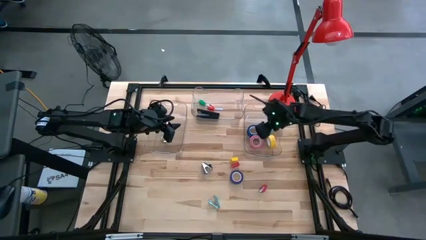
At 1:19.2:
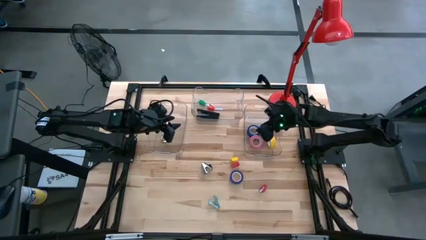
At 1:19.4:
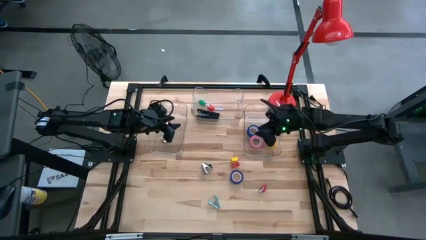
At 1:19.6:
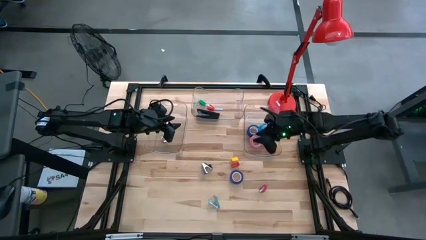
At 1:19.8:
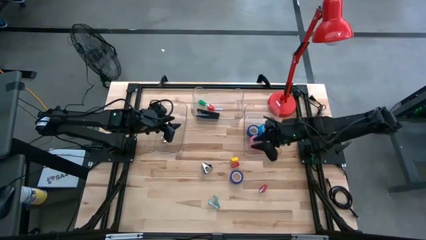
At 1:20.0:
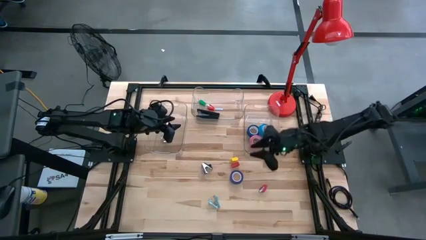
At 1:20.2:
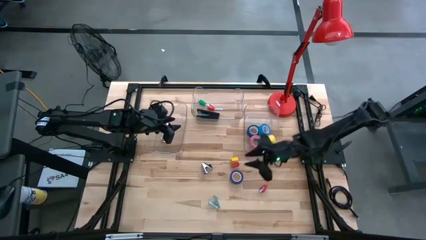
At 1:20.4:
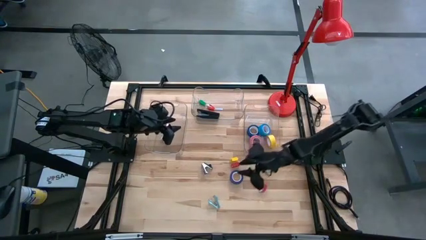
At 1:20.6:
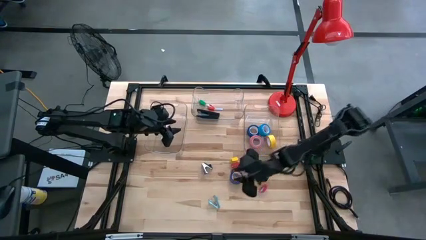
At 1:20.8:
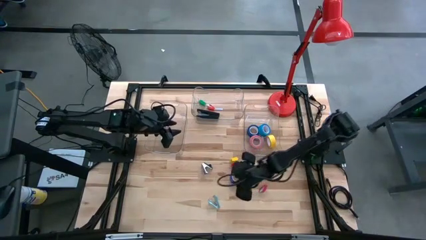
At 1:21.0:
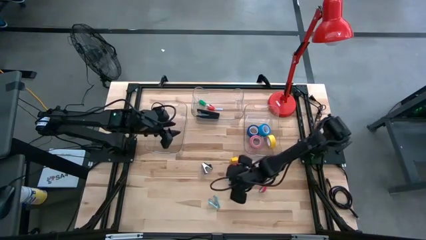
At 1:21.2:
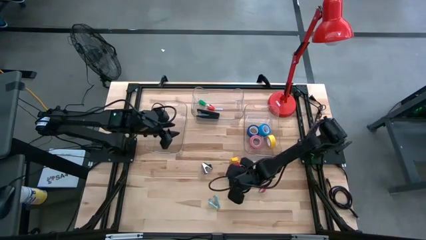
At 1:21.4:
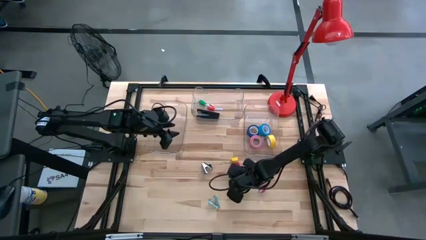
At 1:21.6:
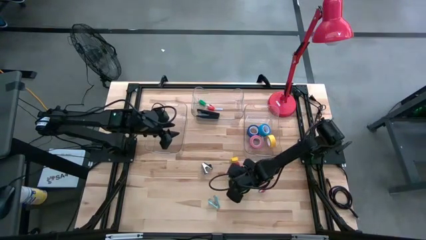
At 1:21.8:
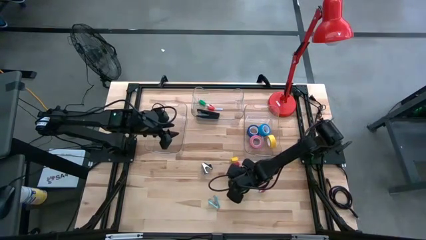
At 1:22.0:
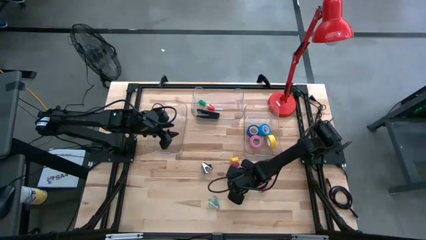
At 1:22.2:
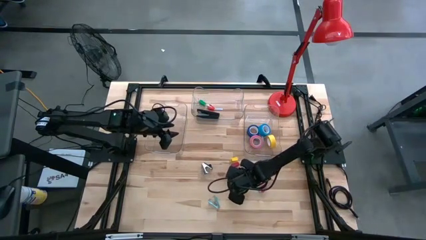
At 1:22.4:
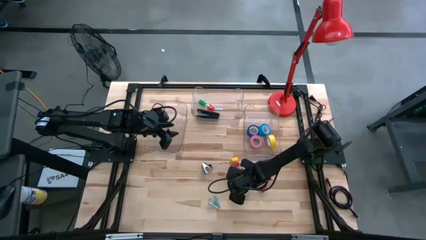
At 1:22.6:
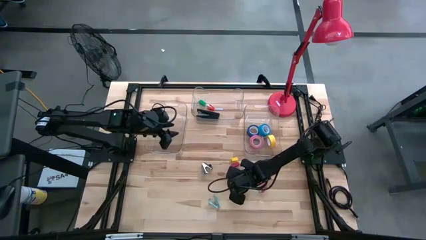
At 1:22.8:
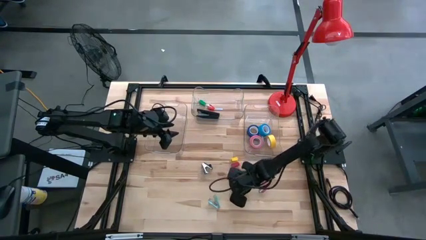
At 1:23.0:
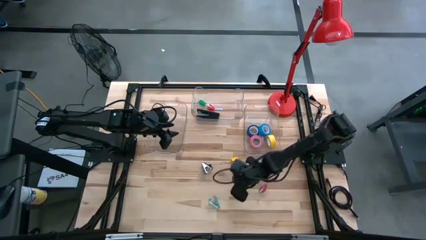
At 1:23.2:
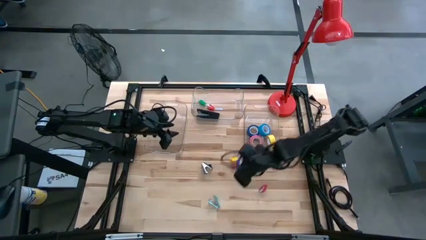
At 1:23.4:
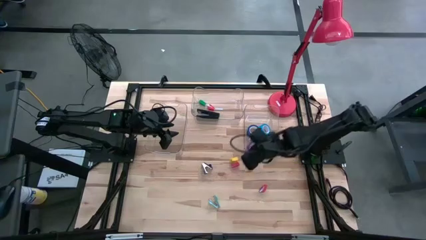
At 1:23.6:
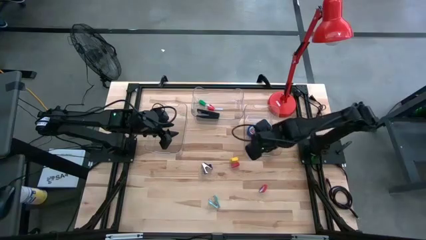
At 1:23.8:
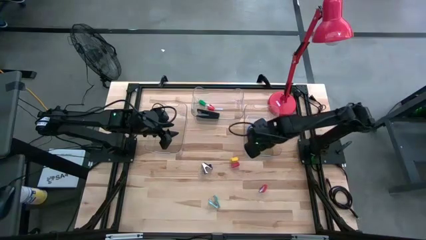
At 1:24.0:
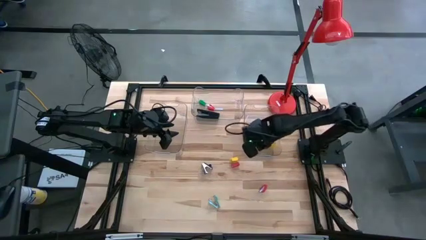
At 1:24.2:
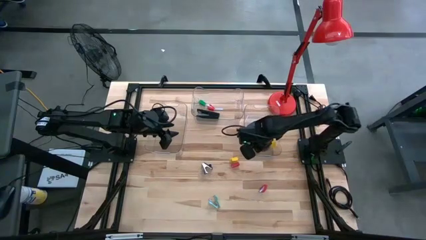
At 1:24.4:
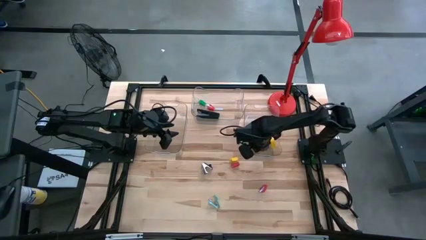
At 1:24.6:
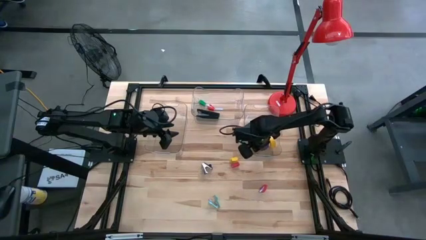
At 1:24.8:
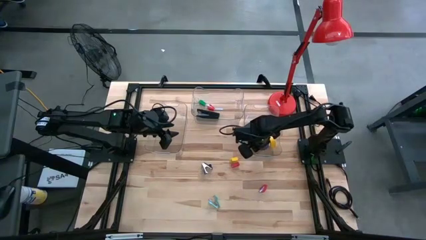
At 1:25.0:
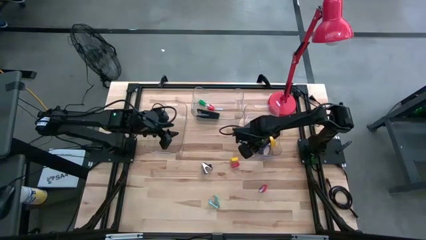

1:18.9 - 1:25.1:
Task: Pick and place Stapler, Stapler remover, tape
Put the purple tape into the bottom right transparent bin

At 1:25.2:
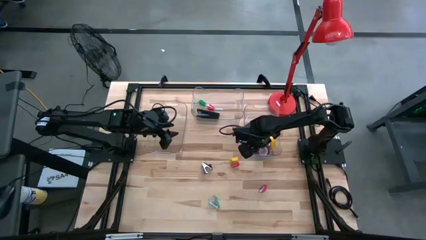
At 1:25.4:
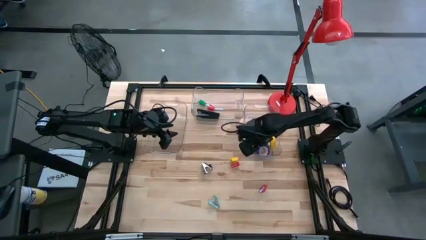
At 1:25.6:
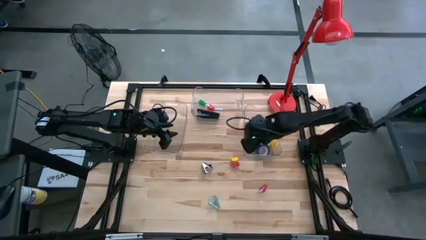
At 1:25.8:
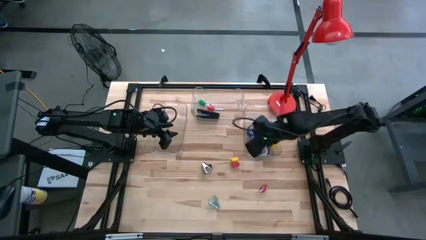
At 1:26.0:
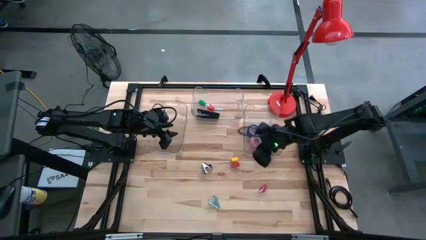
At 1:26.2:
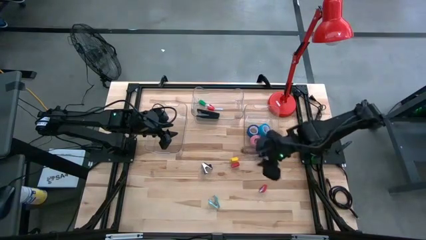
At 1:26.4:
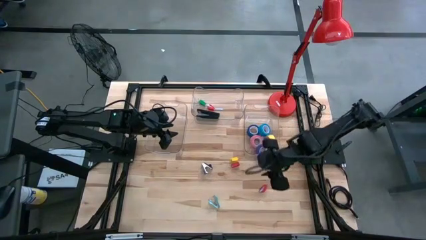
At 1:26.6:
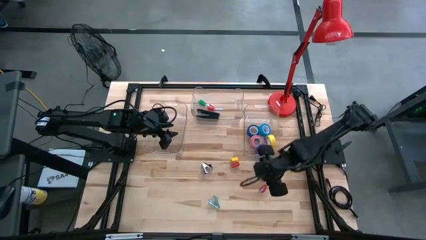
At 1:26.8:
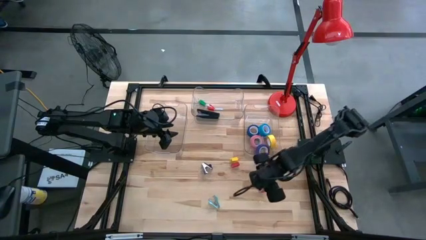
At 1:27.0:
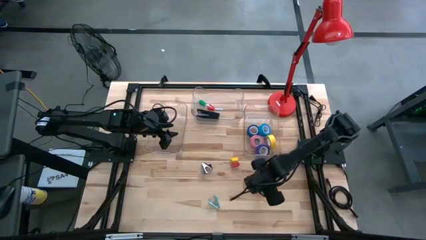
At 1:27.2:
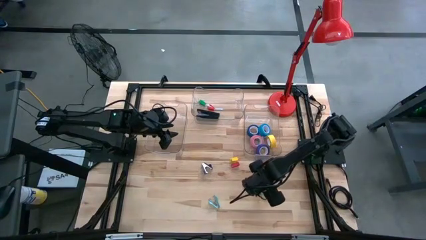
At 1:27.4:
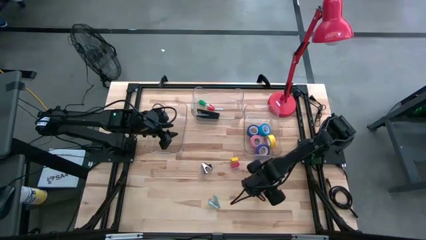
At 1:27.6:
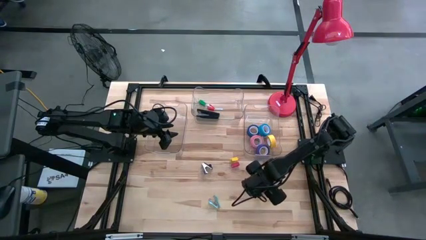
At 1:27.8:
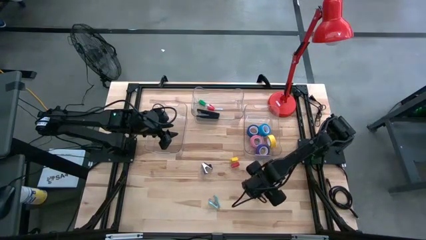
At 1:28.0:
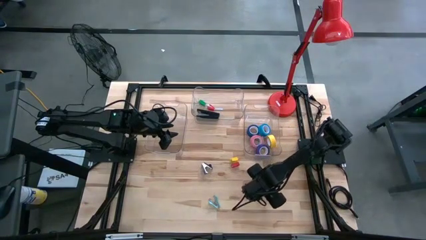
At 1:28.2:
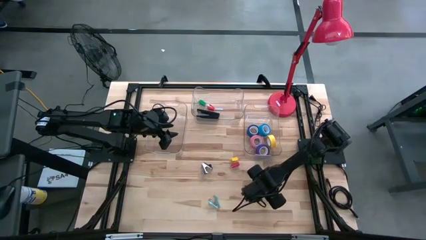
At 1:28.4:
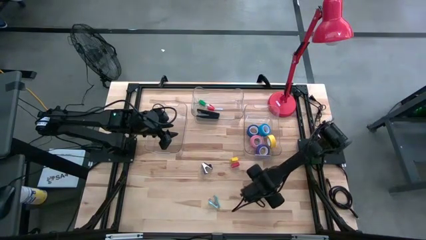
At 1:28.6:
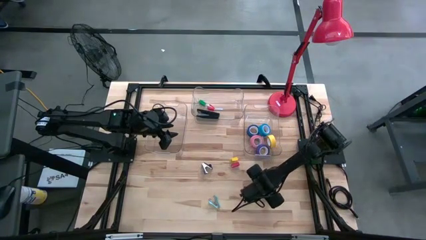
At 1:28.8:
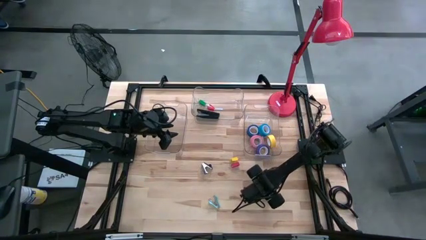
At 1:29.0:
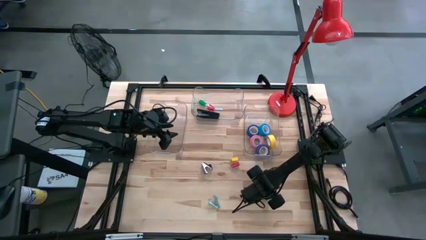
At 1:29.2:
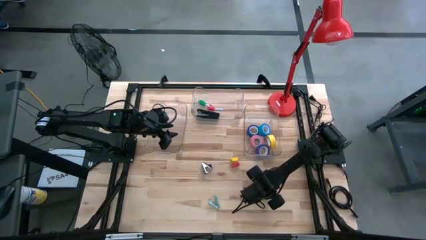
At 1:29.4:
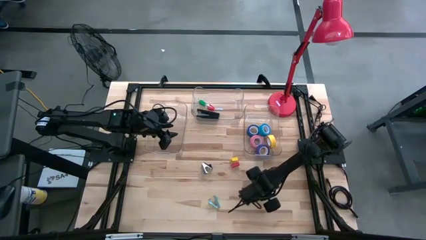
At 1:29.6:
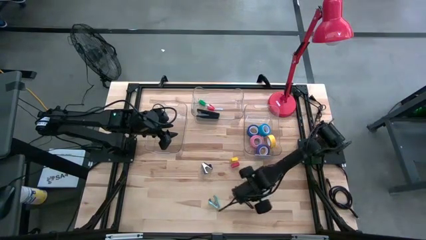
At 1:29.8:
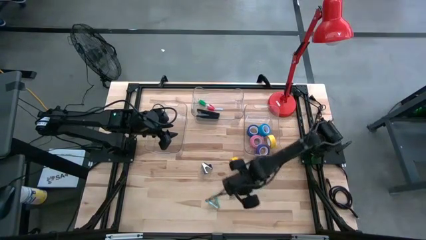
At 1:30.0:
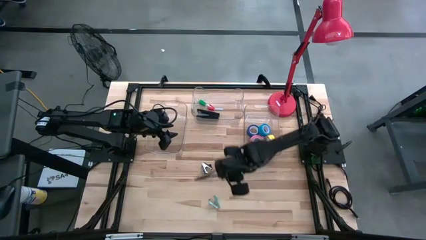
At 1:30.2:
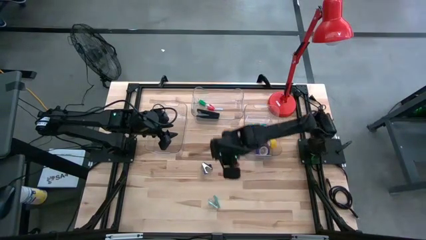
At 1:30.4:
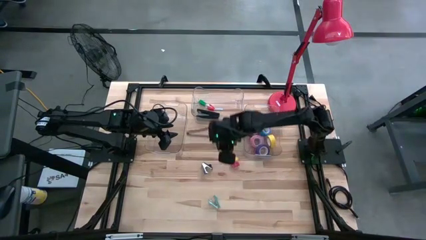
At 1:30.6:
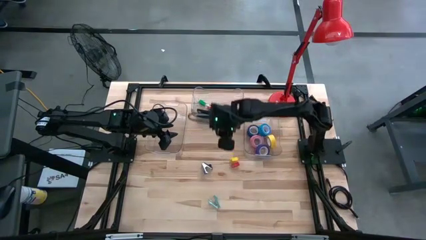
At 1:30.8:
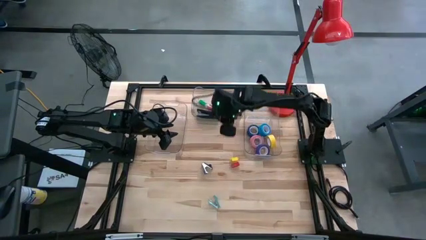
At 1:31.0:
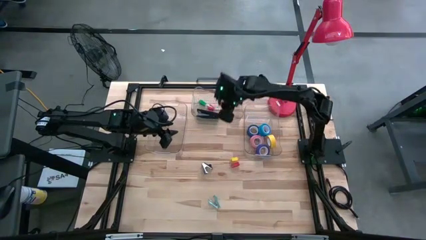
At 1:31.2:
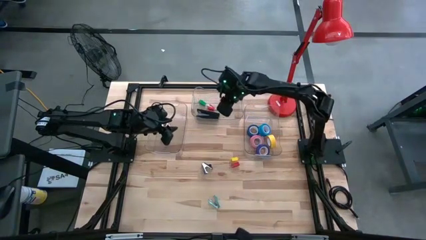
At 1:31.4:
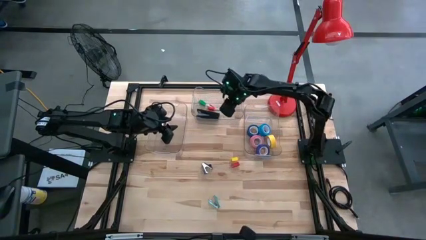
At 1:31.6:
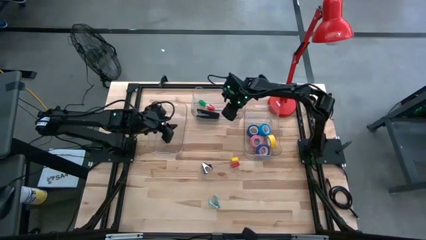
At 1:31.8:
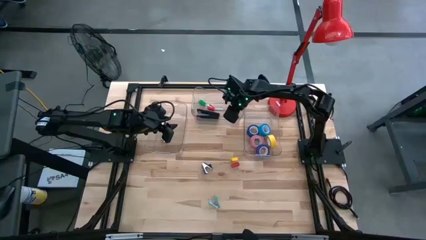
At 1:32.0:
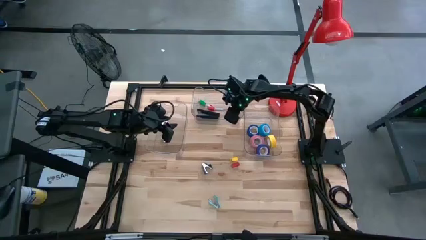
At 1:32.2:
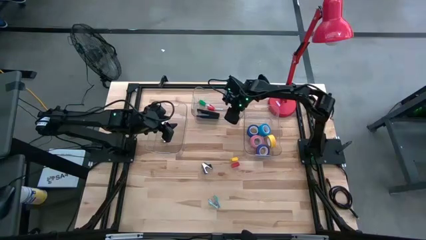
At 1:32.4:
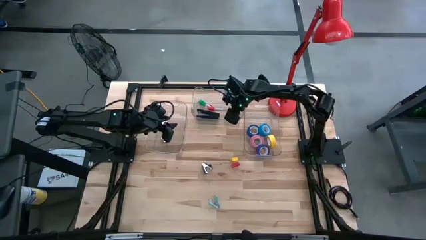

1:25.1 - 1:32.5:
Put the bottom red stapler into the top transparent bin

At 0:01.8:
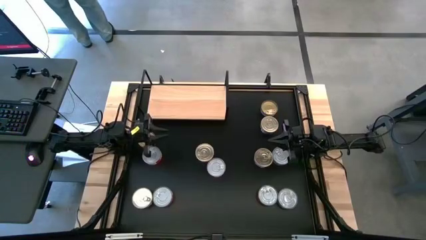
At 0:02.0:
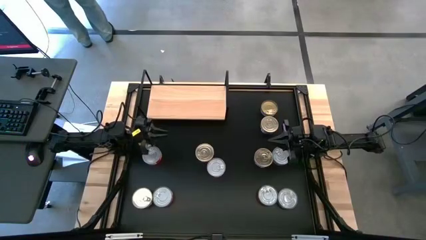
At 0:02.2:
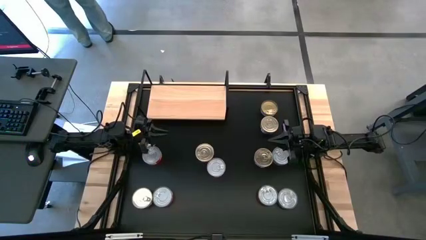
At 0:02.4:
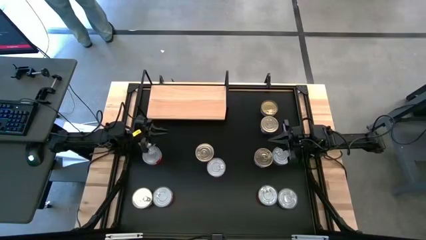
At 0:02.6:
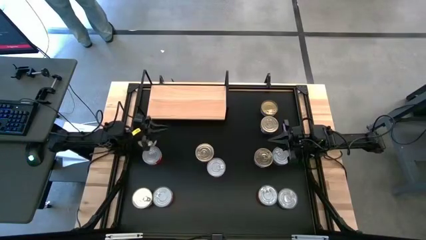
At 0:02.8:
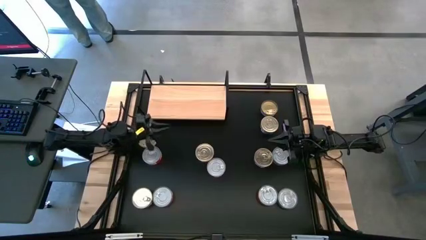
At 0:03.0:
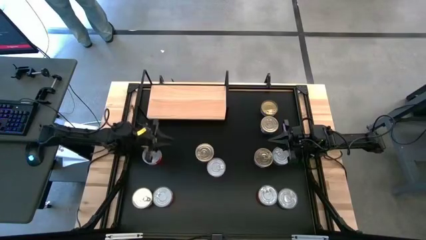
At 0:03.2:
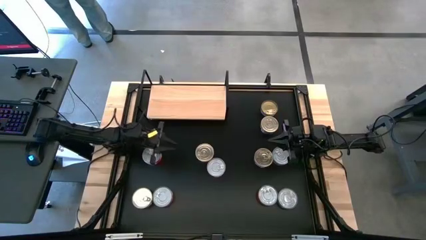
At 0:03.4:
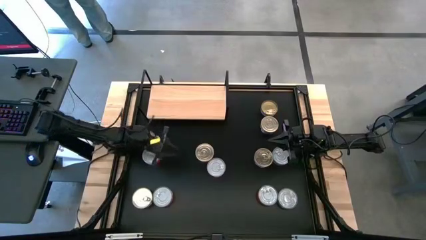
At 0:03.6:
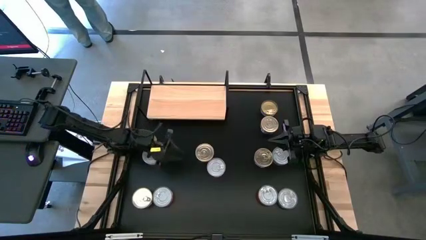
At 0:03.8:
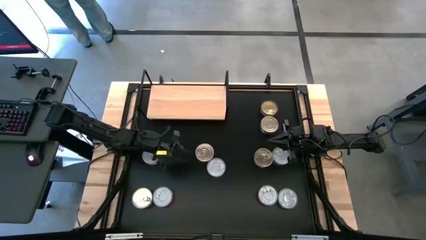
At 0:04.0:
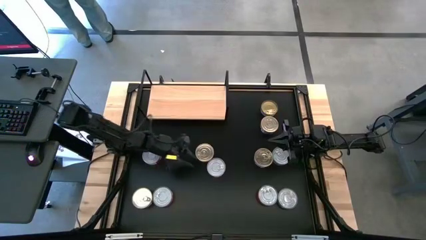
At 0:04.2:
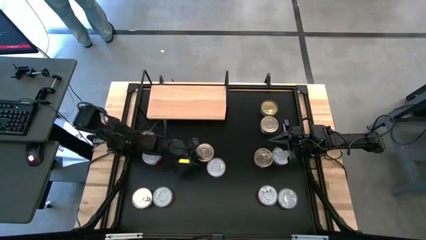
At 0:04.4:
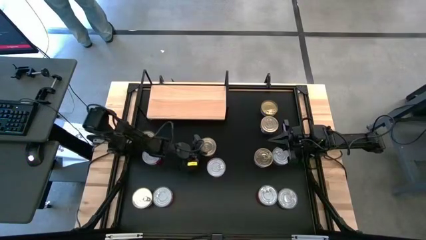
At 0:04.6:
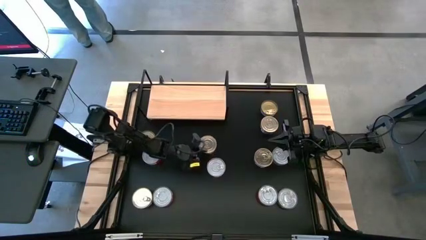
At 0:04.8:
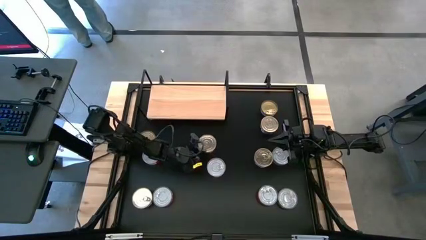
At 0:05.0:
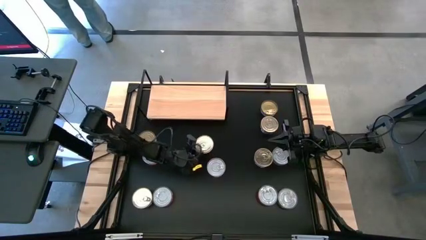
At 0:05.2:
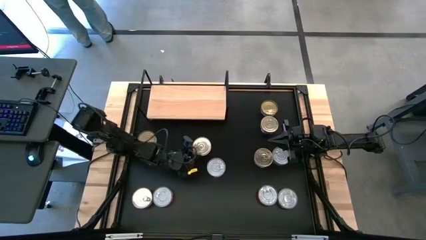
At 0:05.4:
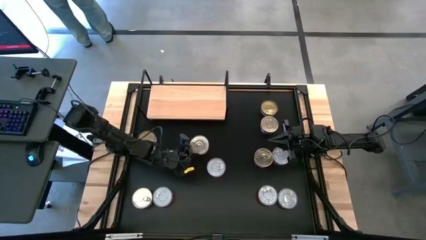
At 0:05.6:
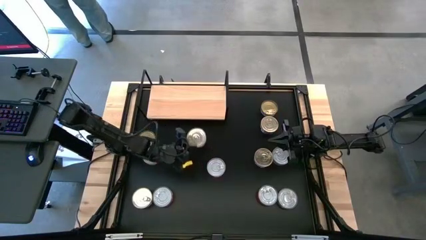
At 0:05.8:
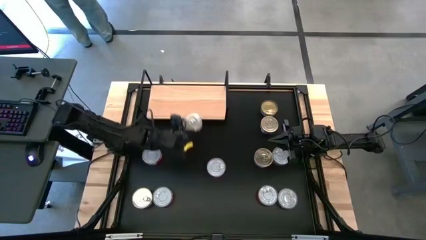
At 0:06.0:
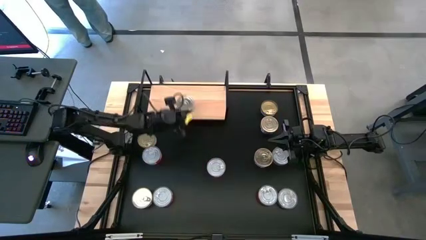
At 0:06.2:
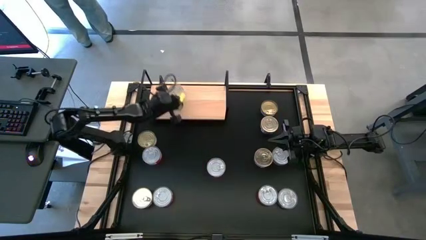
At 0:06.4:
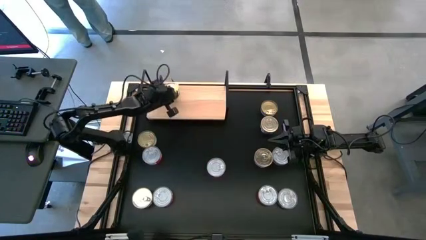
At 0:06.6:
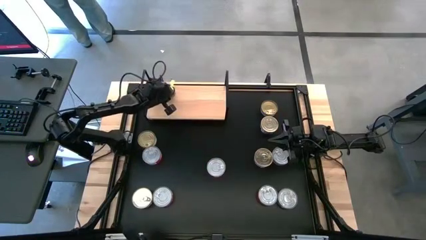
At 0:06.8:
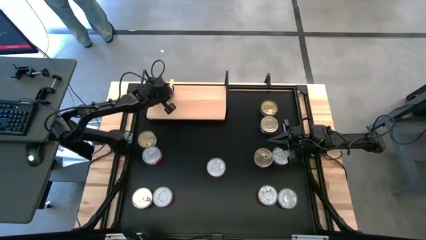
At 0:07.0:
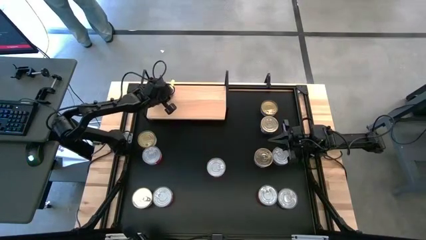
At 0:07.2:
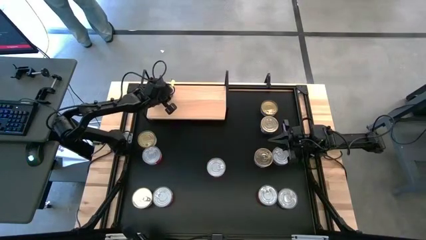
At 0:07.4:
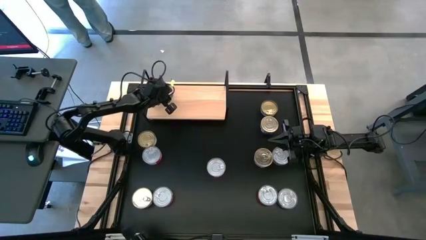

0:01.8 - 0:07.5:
Task: Stack canned seafood by type on shelf
Put the middle top blue tuna can on the shelf
